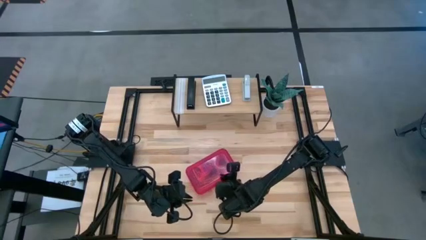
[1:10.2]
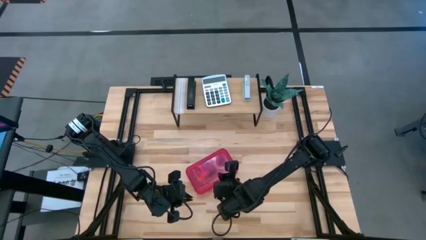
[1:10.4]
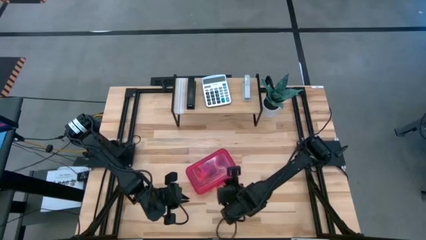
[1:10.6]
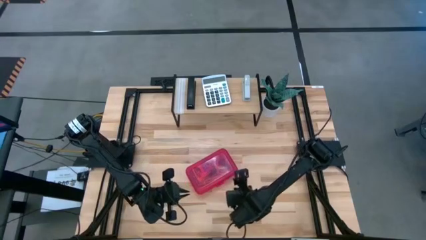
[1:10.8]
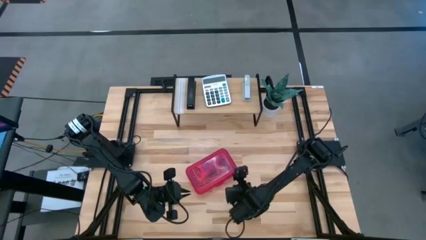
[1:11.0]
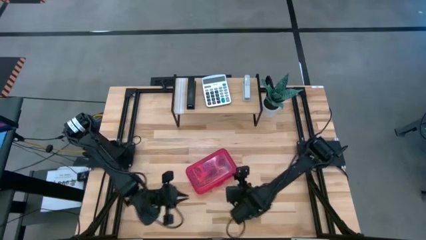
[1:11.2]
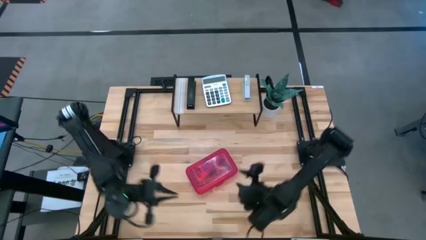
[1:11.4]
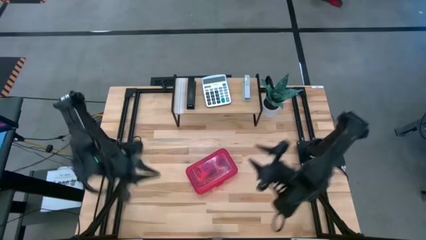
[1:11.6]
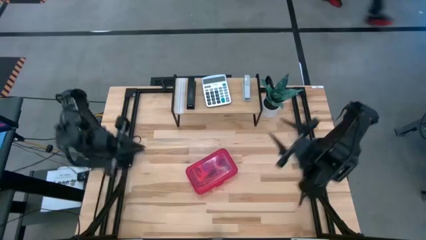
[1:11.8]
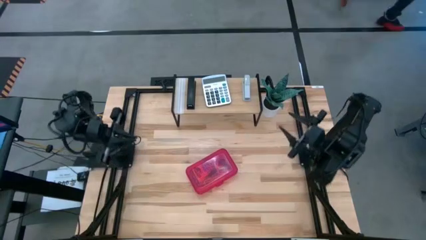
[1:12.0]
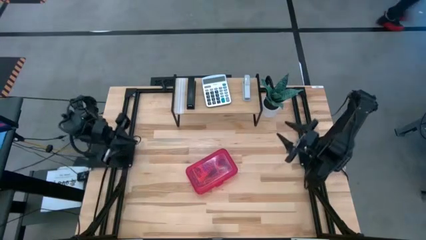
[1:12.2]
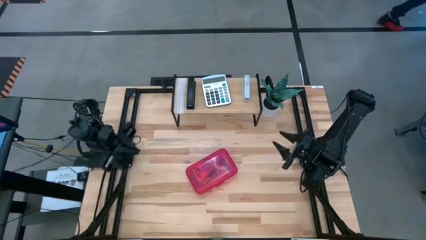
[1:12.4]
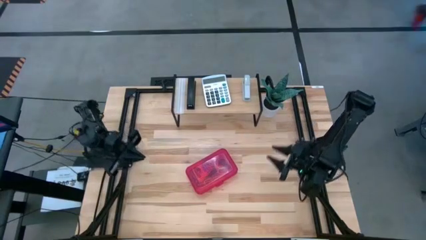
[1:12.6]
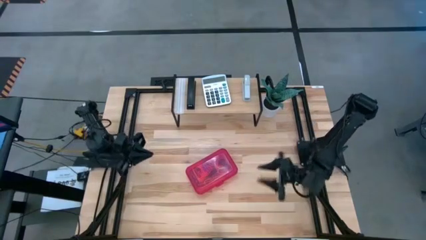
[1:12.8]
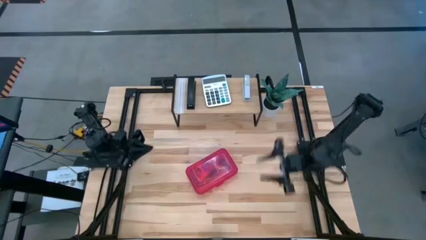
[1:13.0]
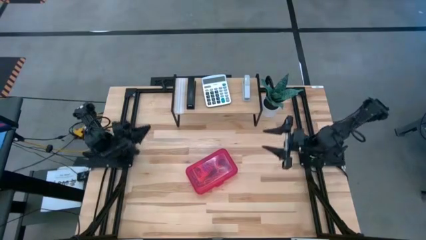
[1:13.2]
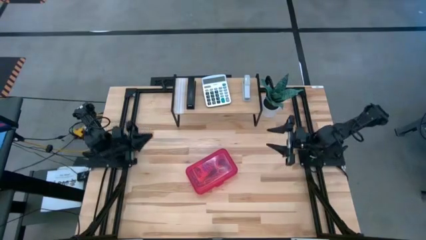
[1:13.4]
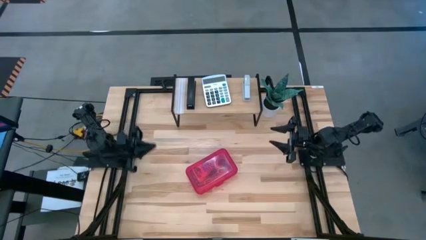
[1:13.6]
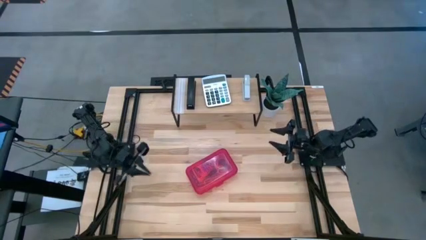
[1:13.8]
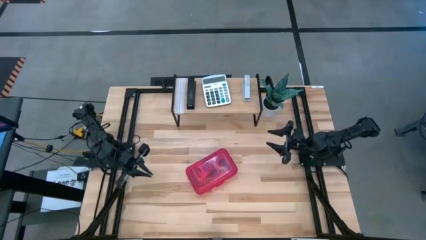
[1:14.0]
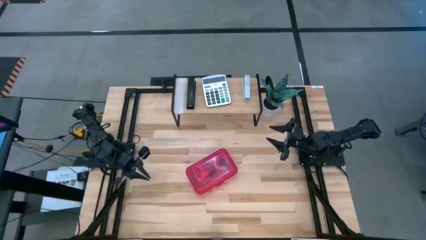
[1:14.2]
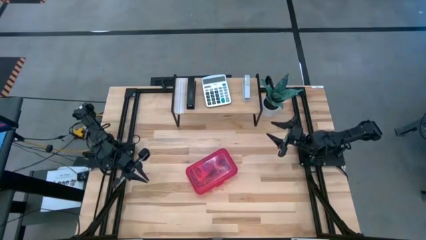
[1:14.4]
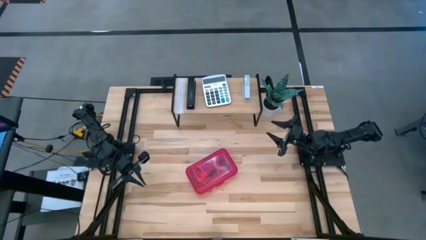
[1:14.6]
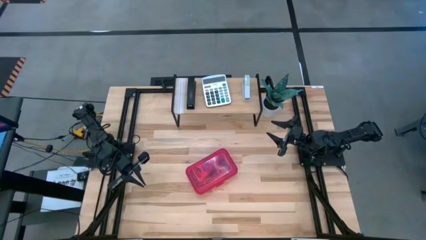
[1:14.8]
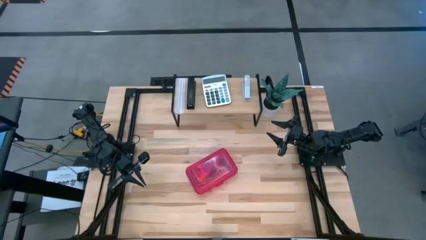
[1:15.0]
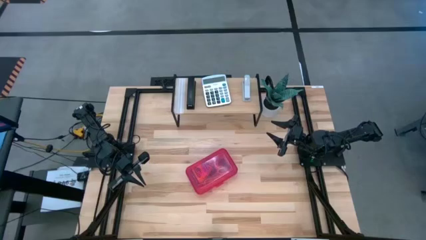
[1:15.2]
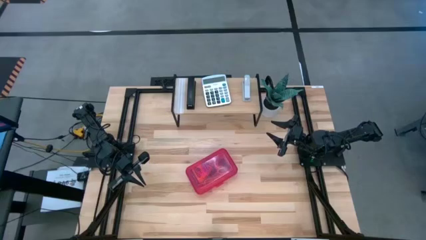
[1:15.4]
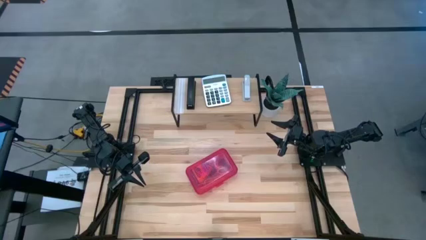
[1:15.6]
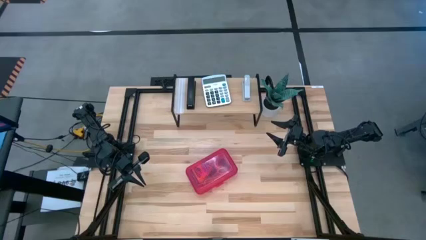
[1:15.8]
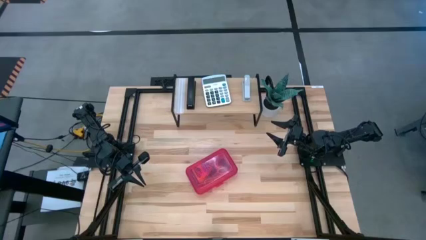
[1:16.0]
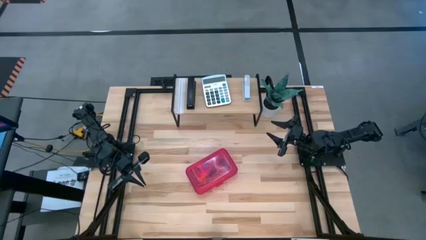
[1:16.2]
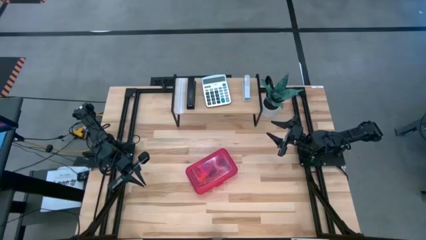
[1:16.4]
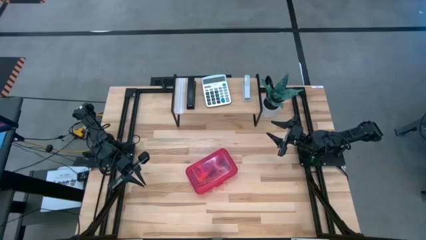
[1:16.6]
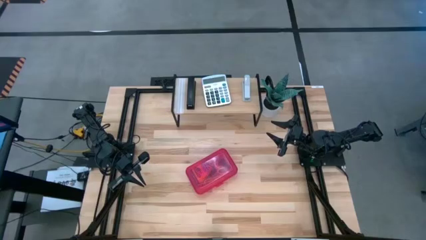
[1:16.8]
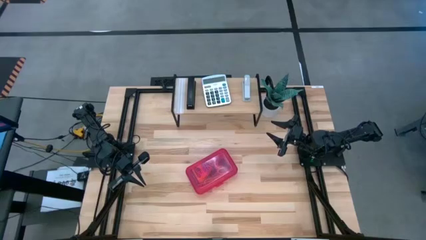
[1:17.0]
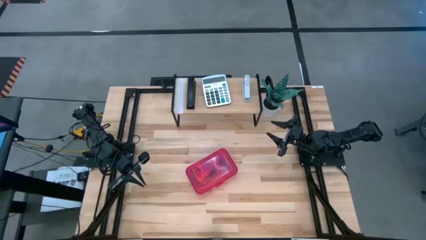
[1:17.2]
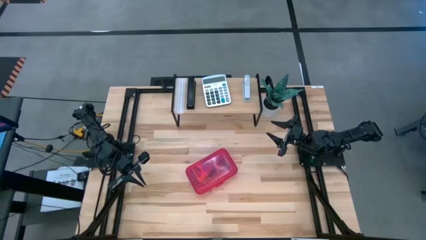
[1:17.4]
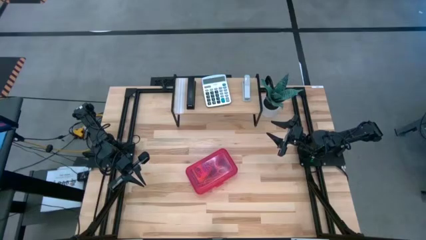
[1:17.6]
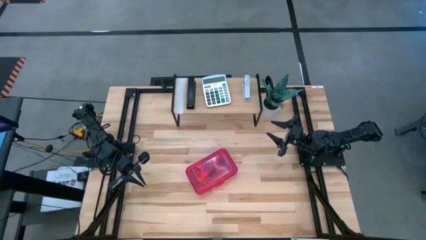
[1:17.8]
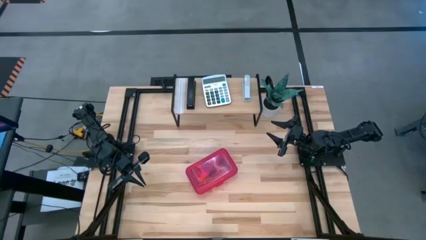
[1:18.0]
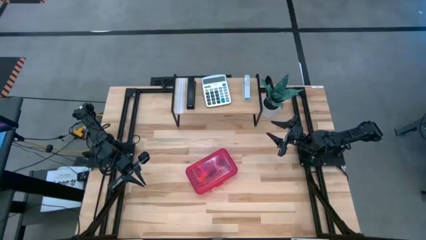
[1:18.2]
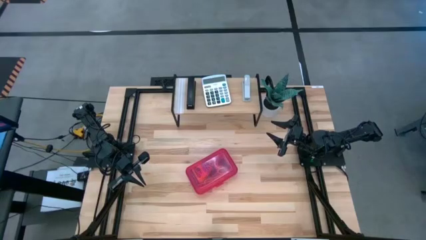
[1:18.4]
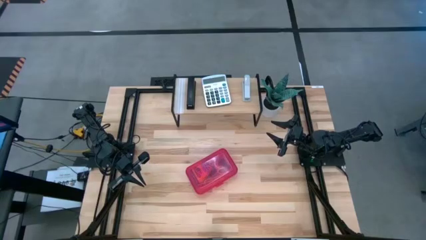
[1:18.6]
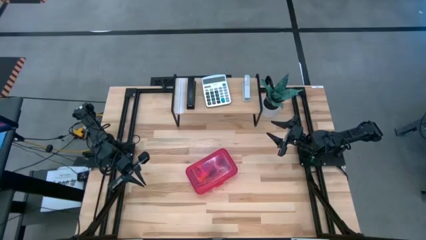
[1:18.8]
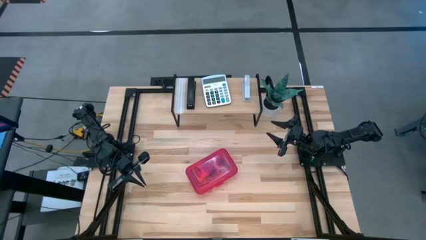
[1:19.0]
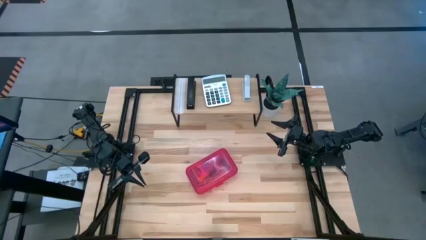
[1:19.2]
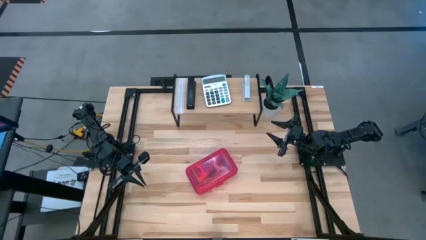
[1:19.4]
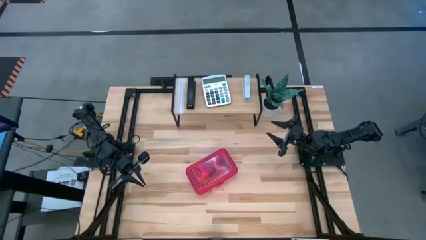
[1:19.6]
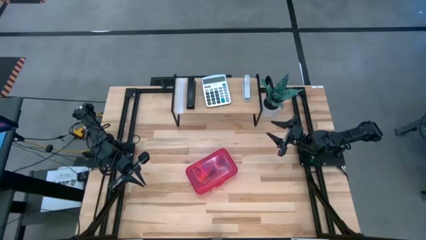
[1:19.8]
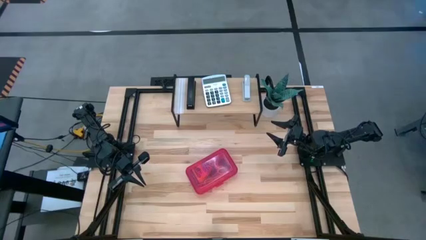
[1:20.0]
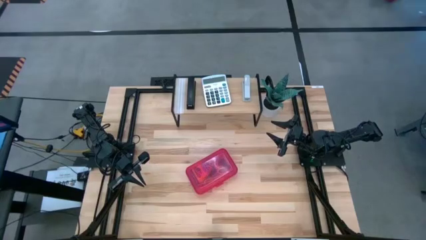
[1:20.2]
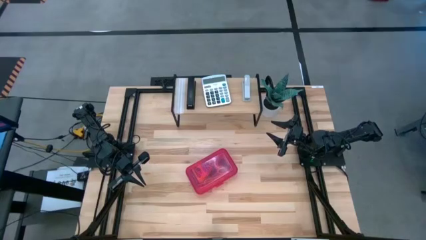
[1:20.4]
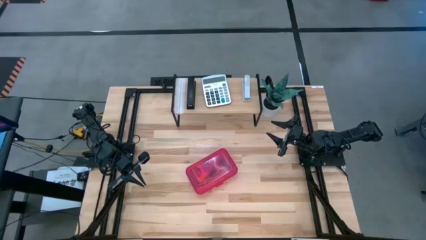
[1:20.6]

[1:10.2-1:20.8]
Task: Pack school essentials
Return to Home Position

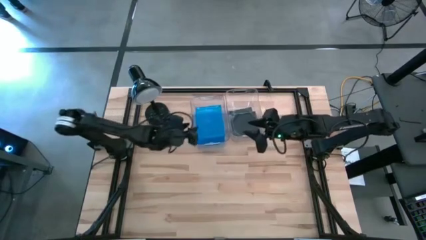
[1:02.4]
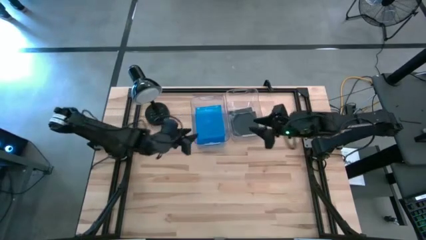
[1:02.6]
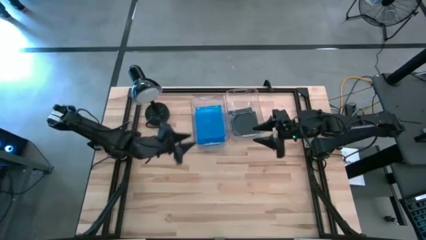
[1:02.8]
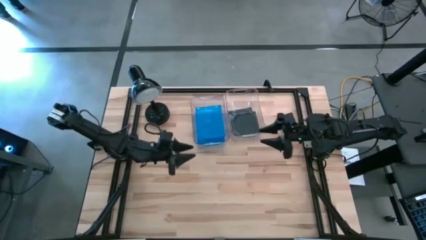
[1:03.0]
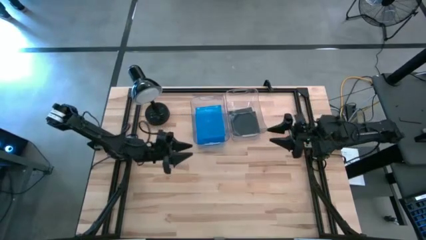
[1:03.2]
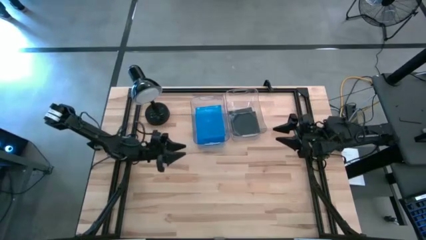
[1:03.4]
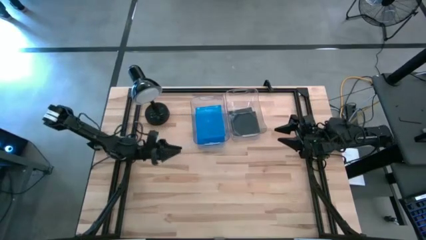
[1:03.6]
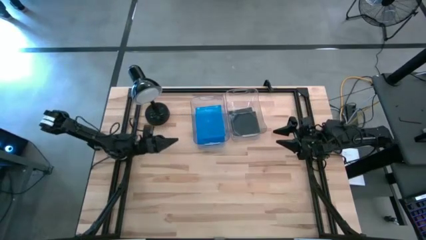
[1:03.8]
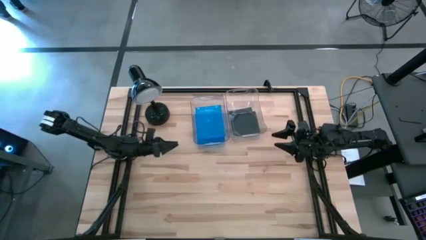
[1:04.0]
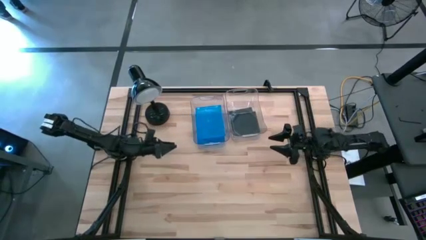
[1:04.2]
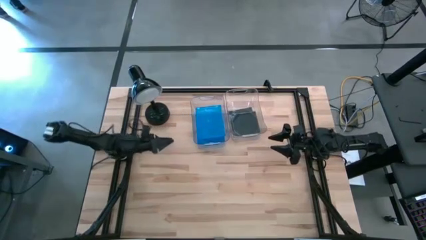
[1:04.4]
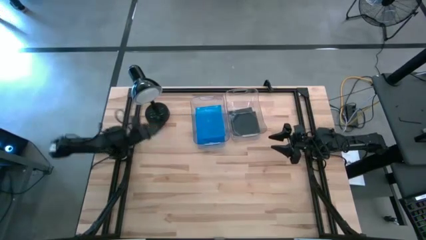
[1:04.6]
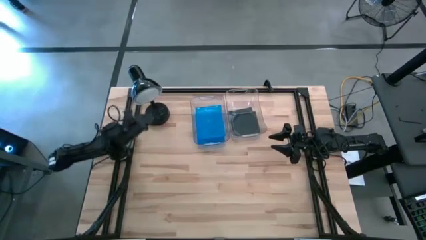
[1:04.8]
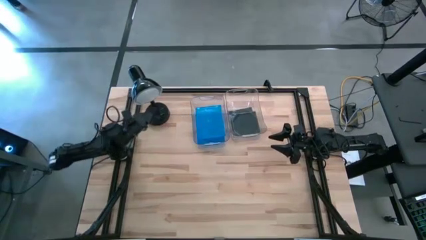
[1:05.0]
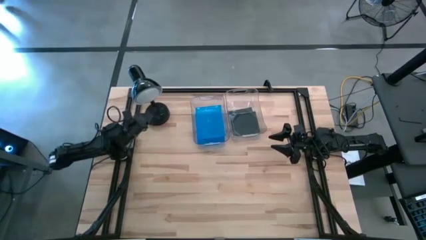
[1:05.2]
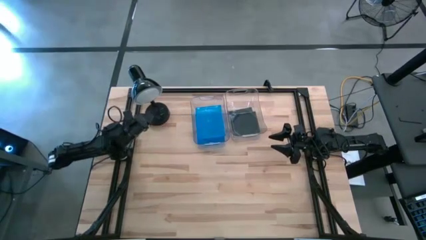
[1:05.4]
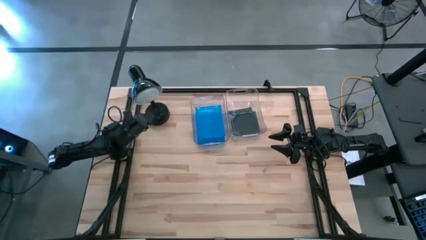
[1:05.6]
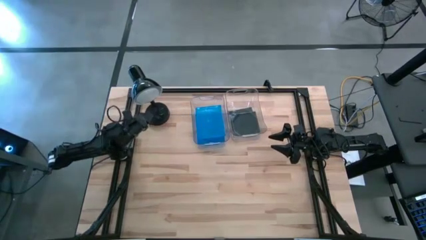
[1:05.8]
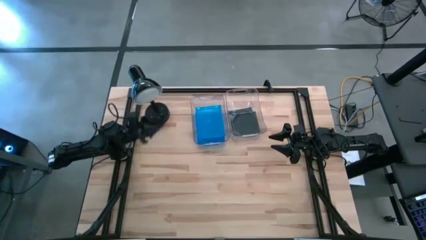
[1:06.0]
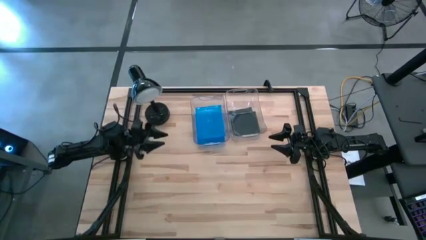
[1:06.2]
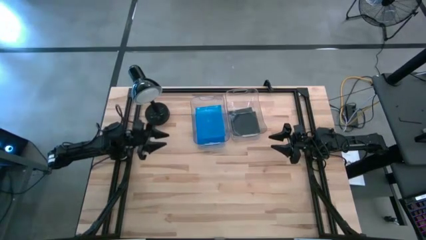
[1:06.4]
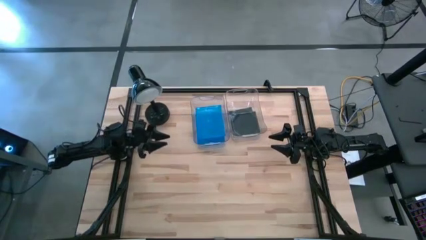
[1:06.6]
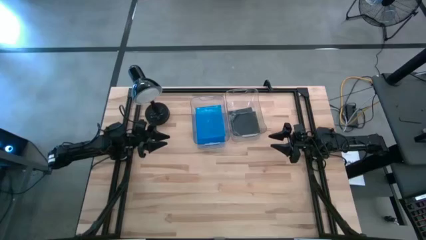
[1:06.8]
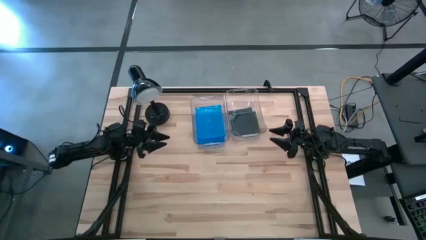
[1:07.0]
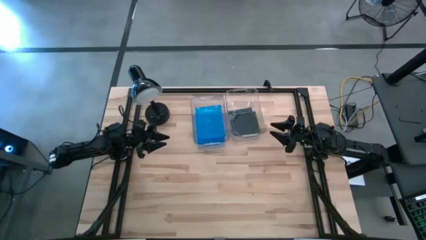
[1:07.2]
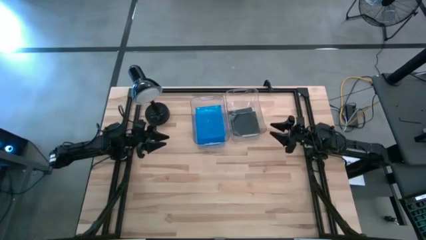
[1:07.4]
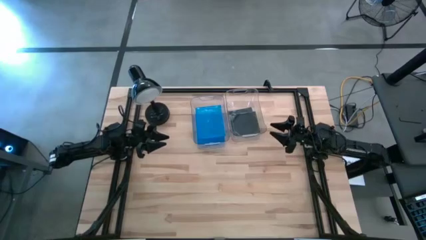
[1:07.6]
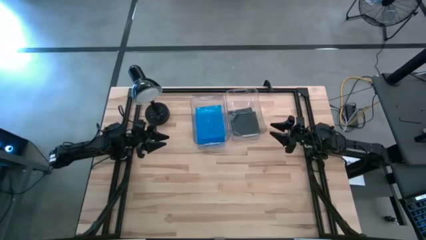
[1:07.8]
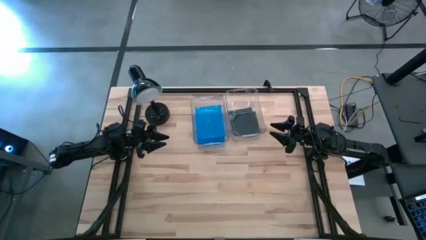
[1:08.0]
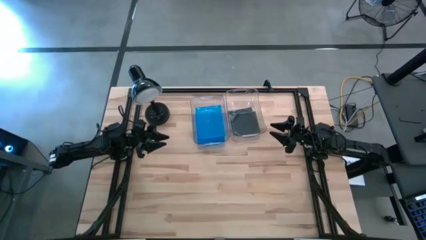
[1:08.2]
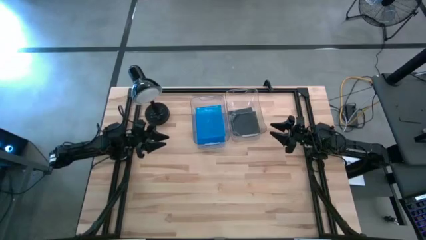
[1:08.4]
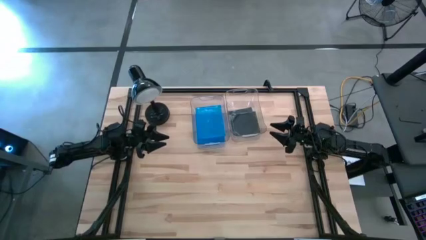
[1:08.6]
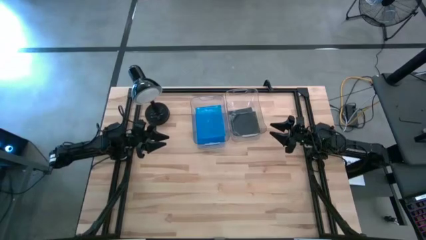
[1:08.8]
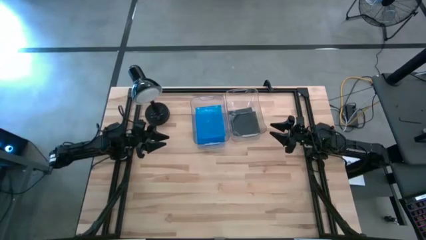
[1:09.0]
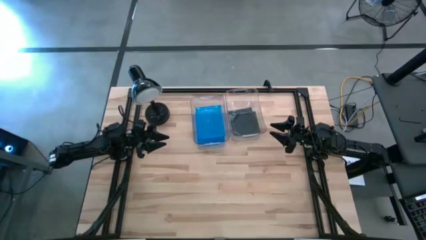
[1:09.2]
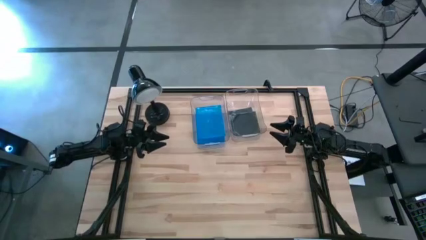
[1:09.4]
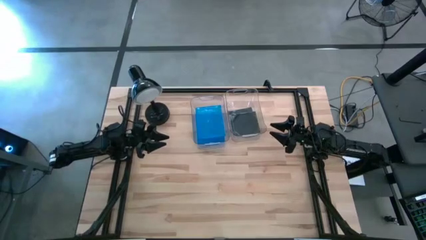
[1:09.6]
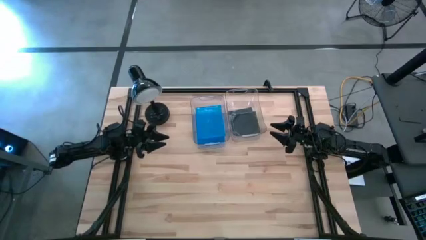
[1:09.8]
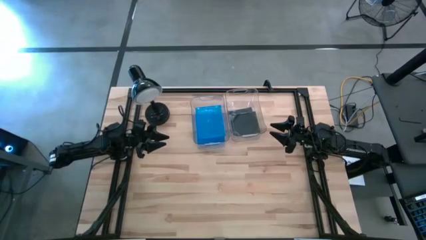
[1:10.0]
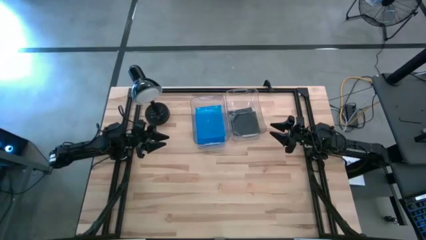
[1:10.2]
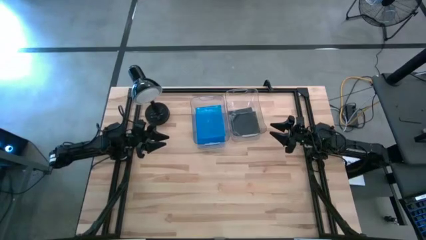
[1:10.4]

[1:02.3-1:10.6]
Task: Pick & place jewel cases by type
Return to Home Position
